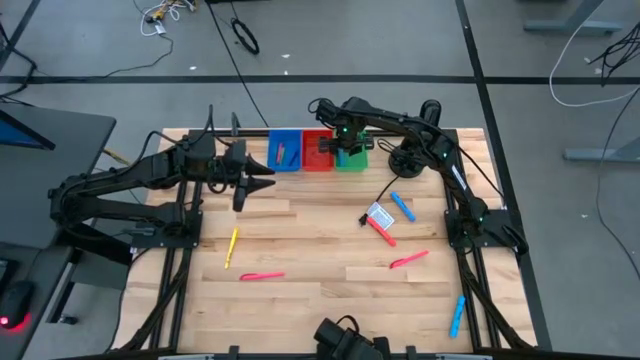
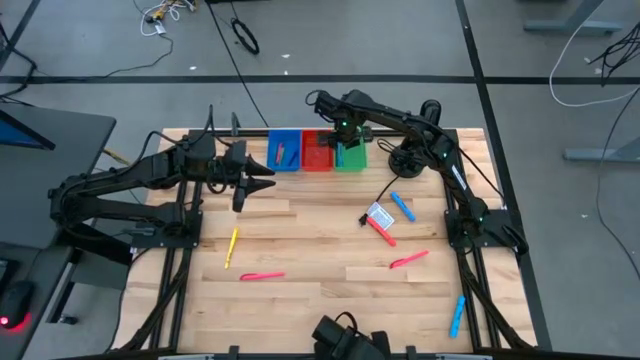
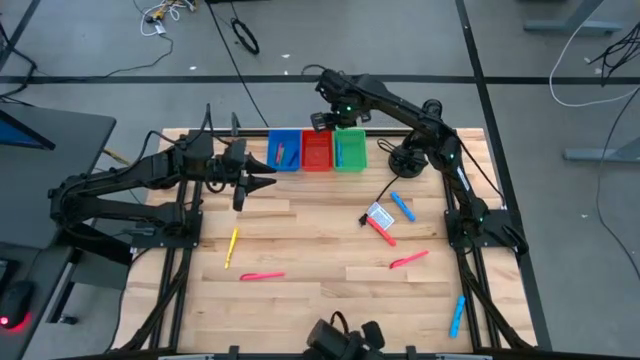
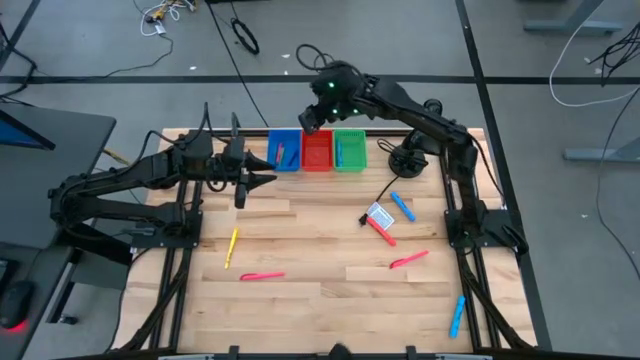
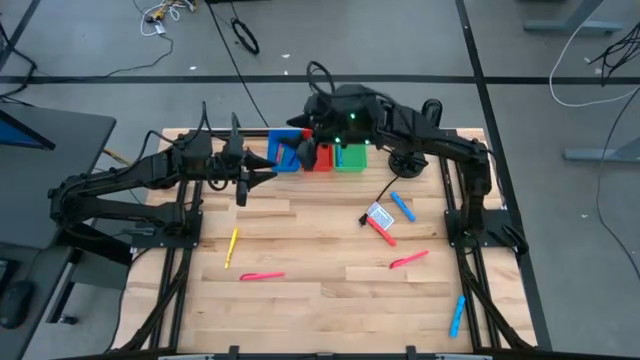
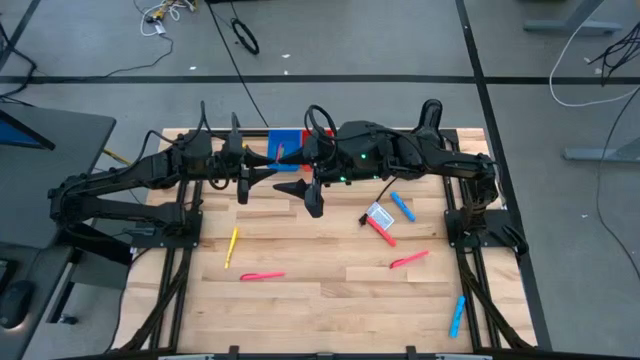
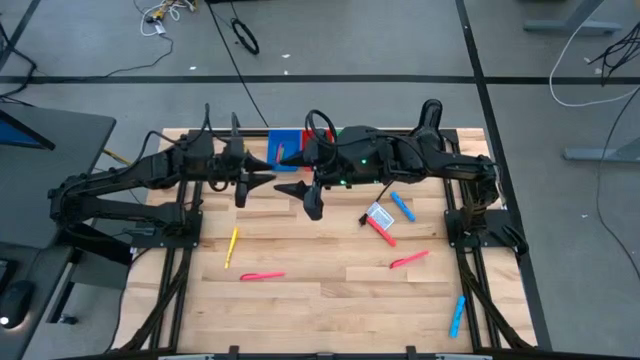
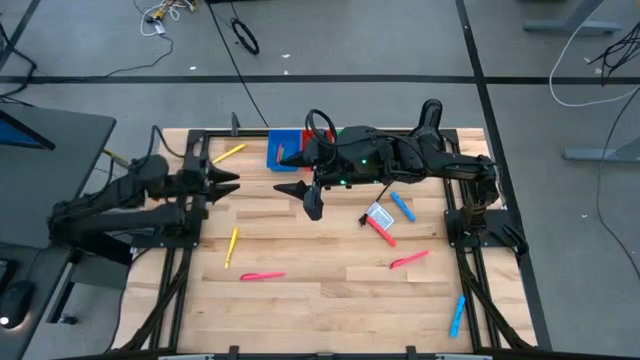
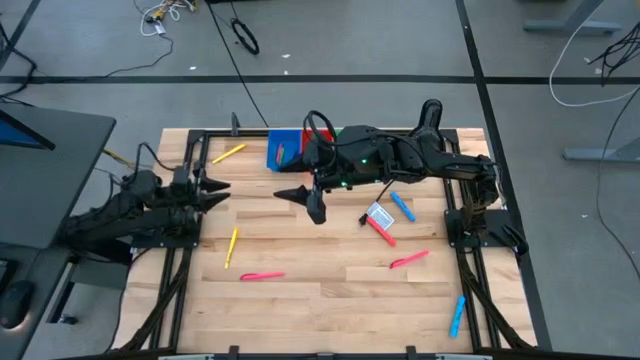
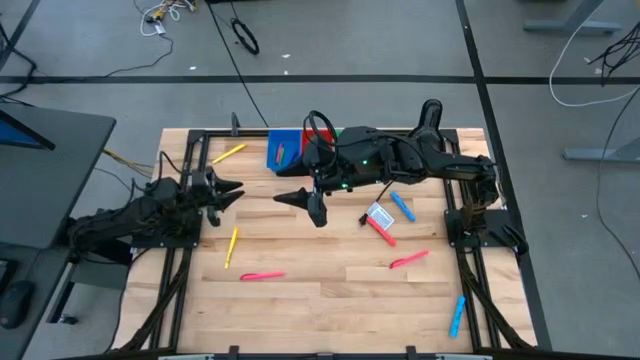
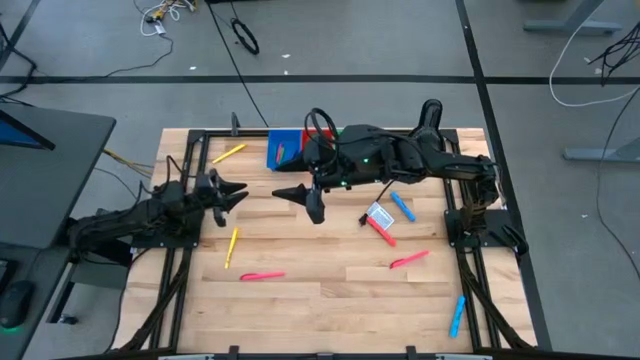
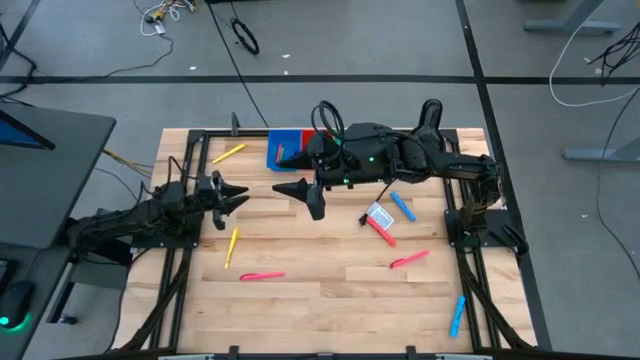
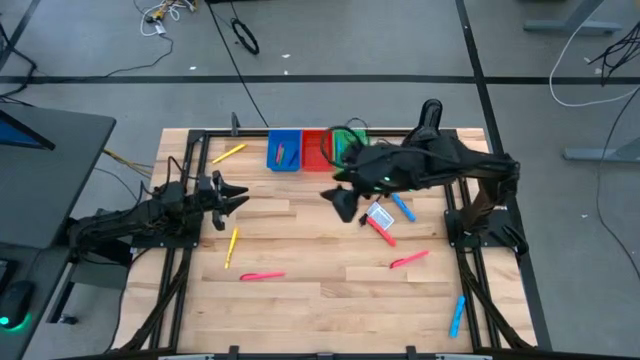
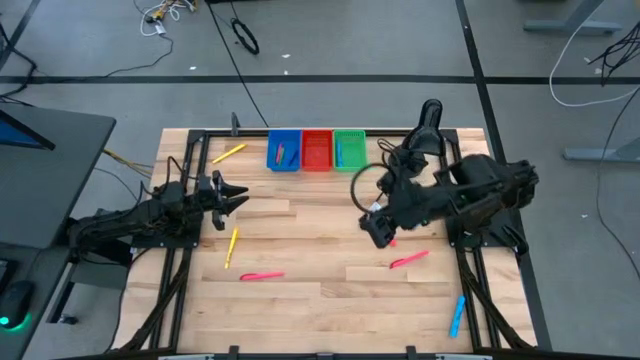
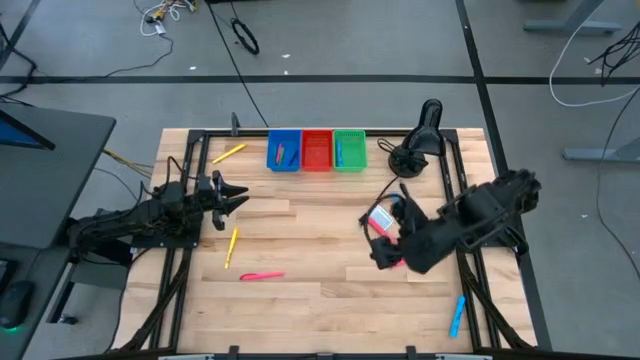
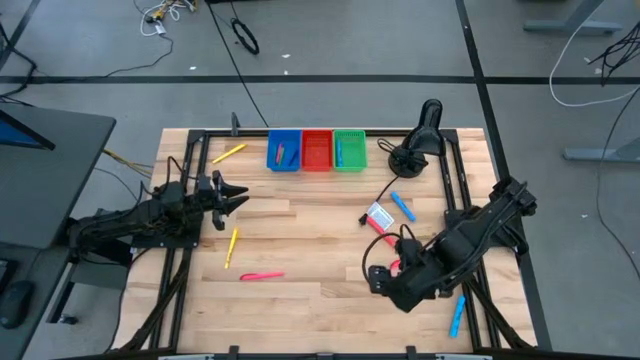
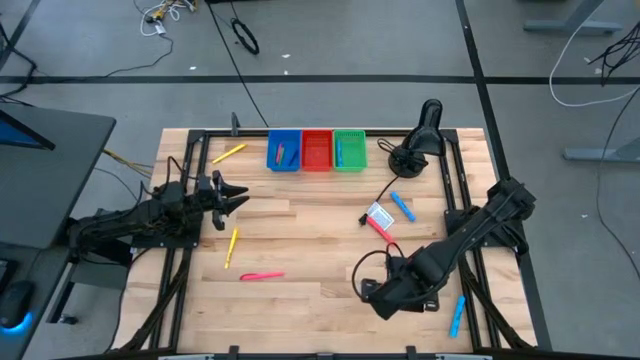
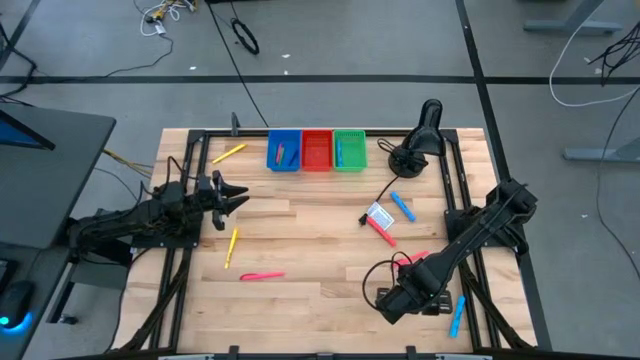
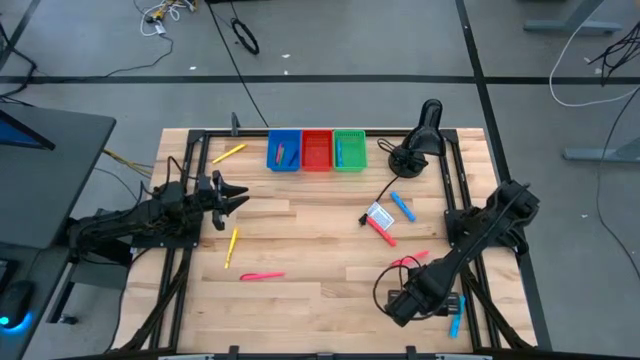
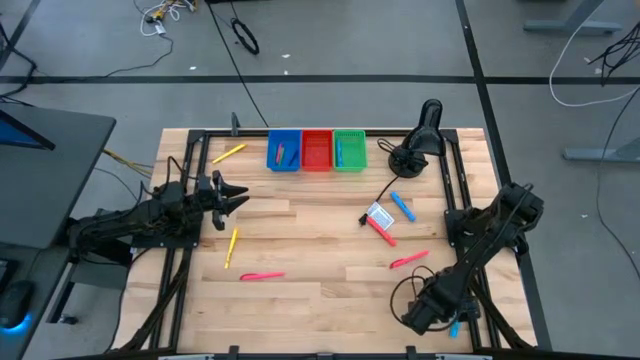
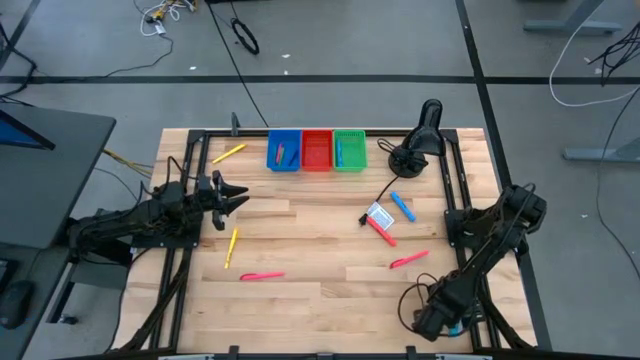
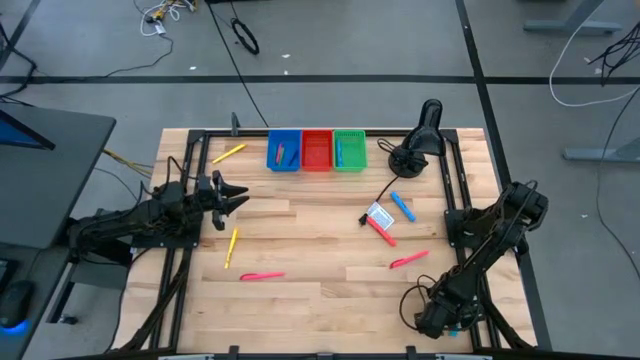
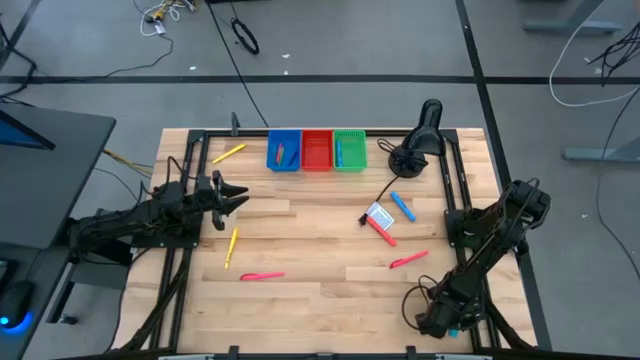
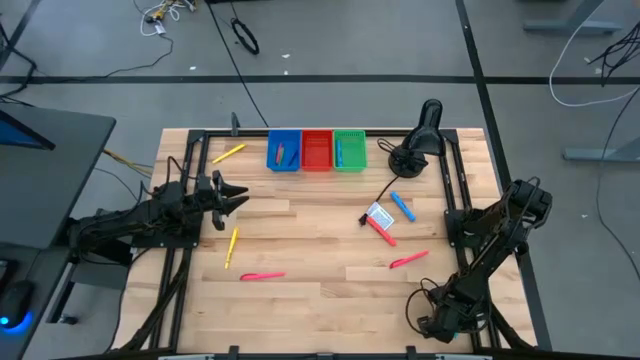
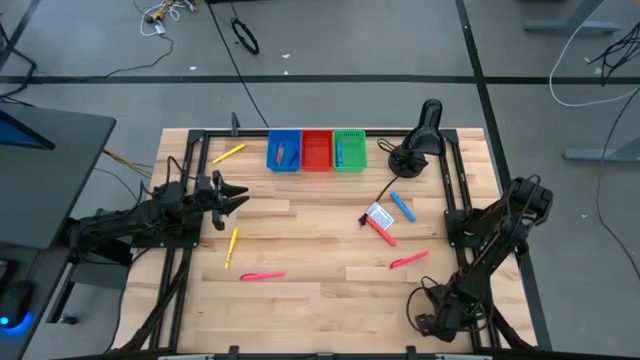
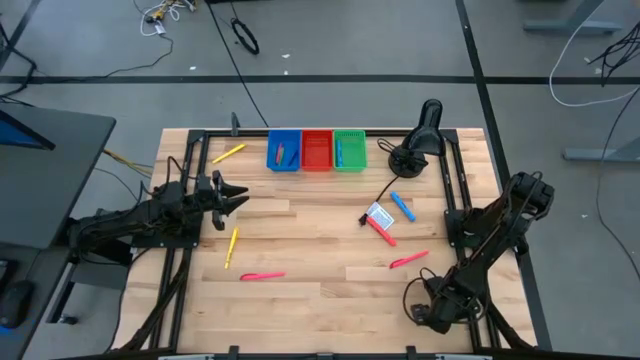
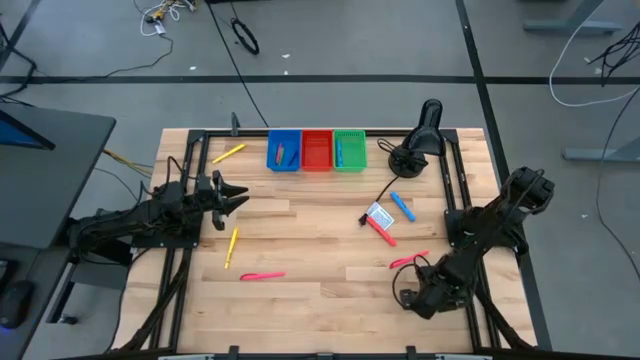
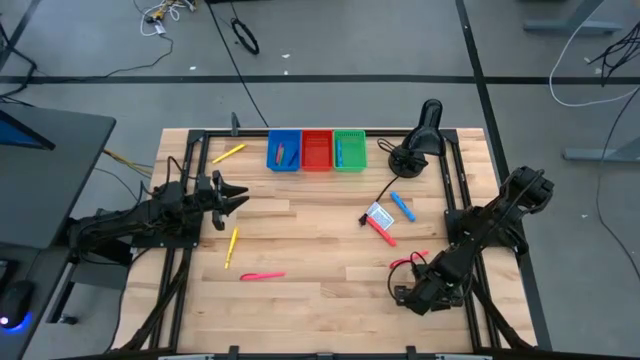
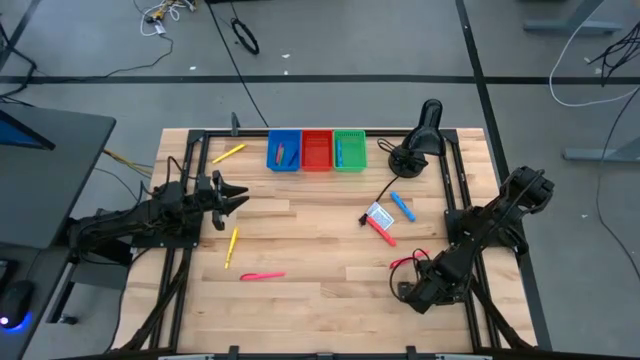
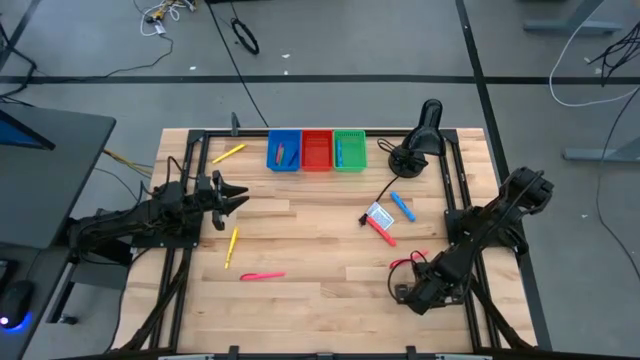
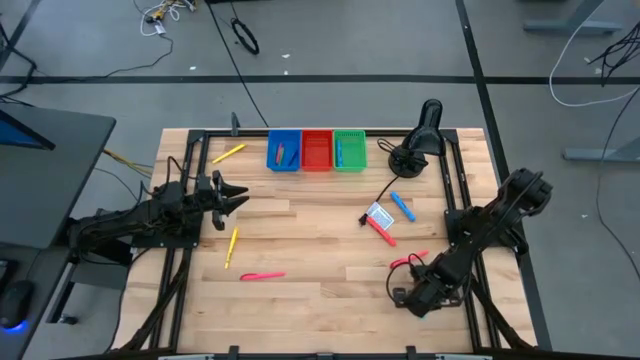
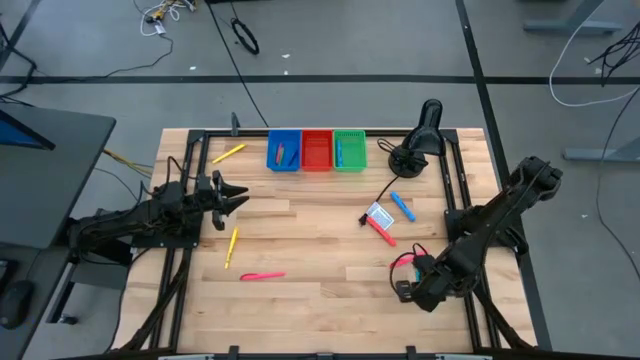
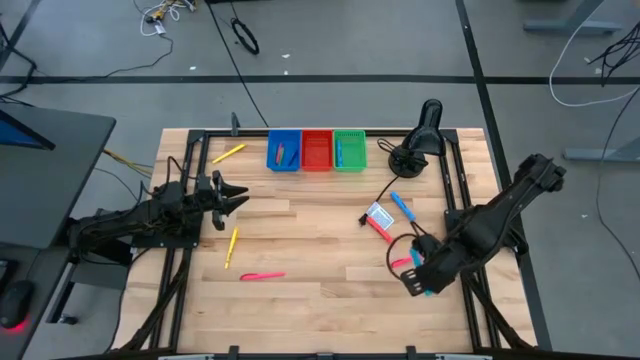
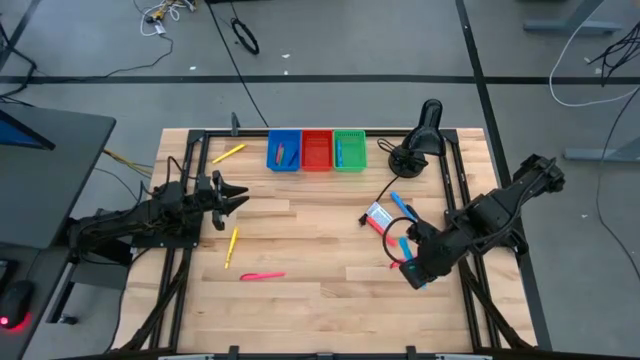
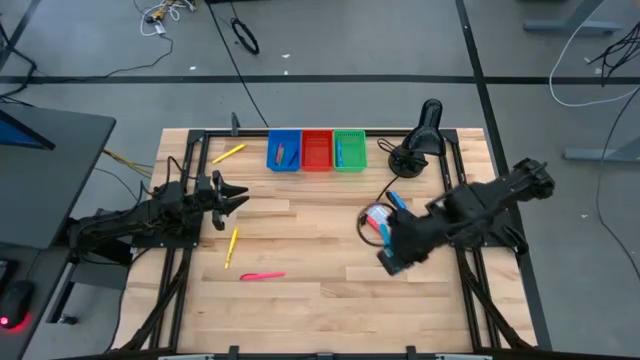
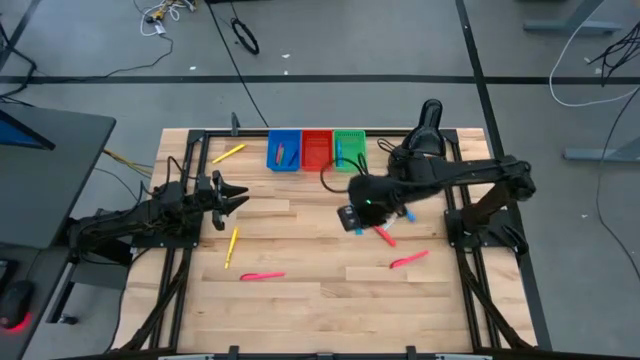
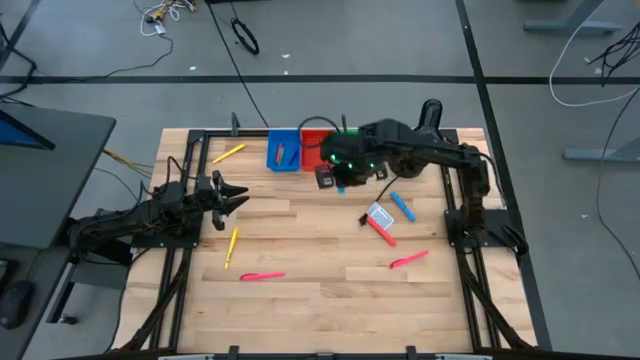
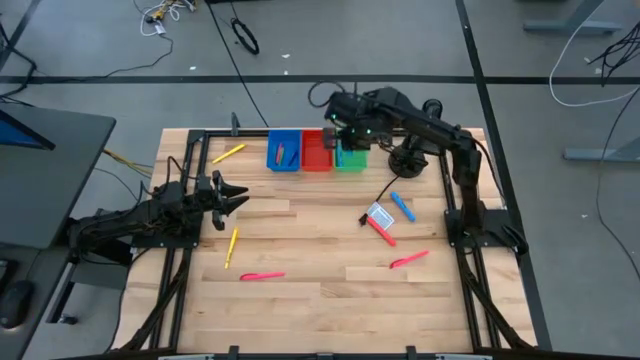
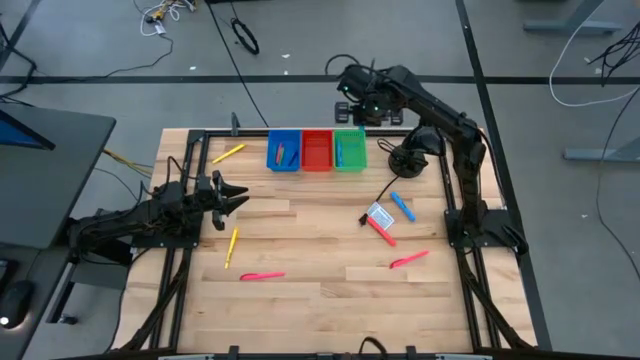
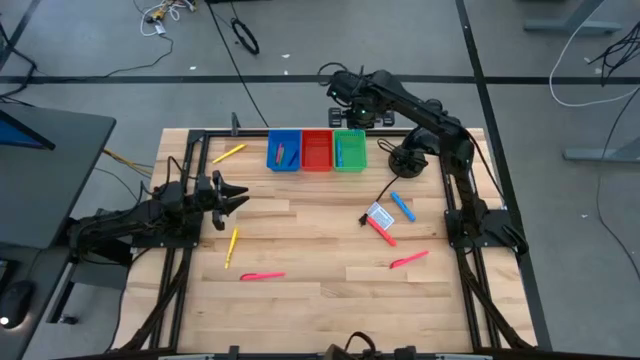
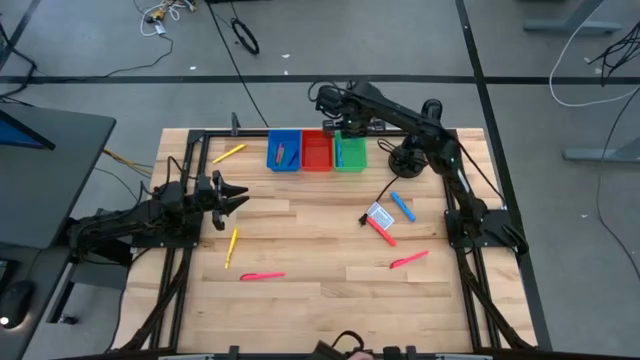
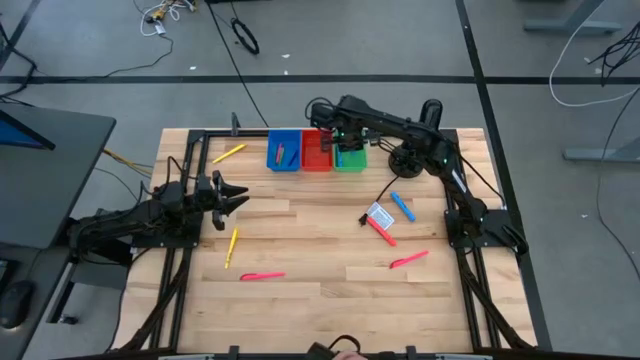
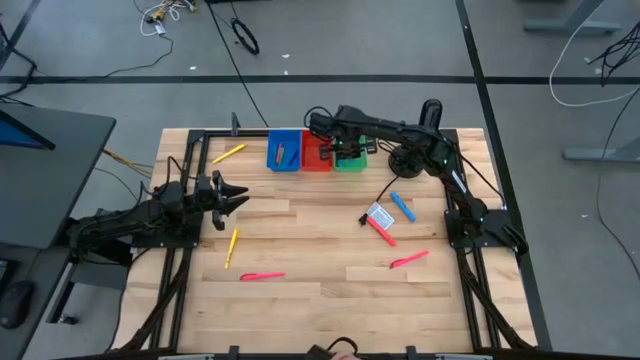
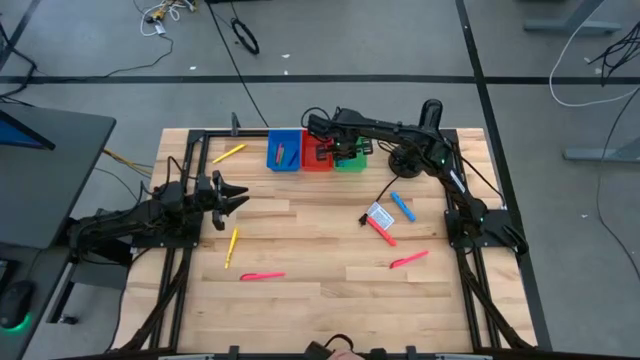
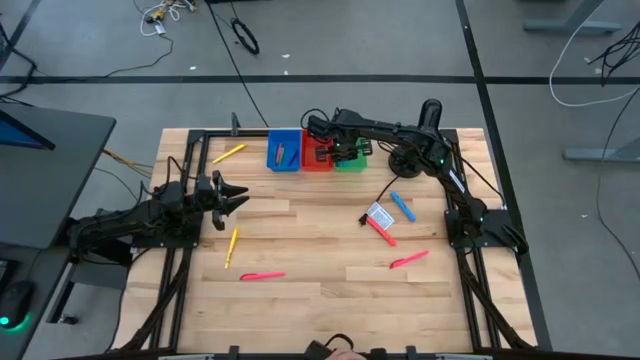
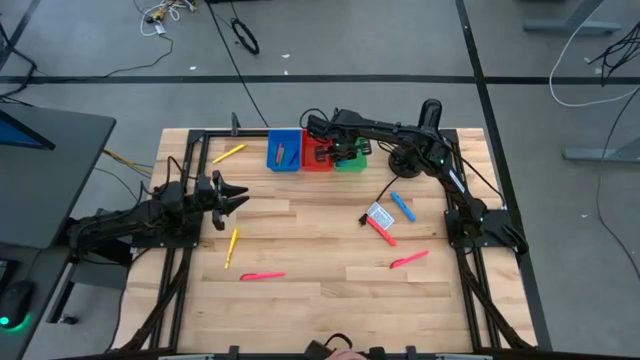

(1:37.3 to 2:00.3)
Task: Pick & Place Markers
Put the bottom blue highlighter into the green bin
